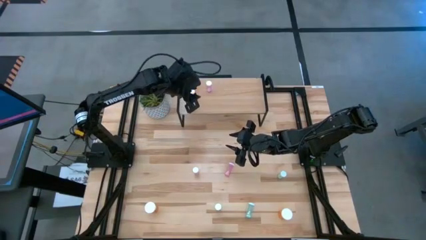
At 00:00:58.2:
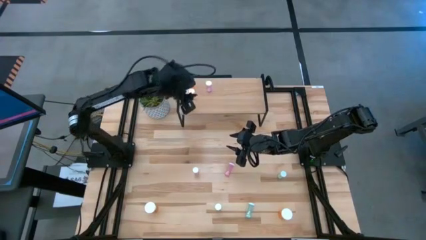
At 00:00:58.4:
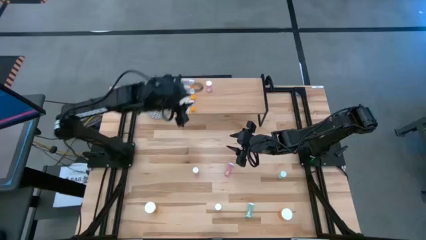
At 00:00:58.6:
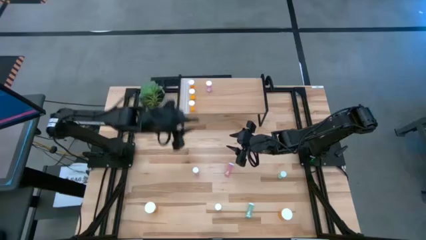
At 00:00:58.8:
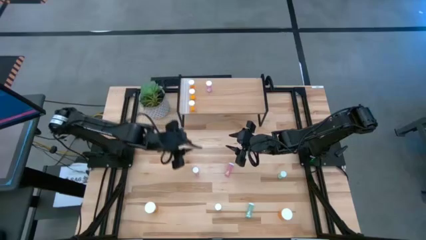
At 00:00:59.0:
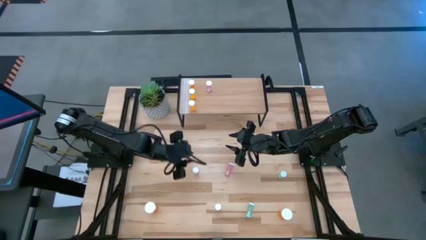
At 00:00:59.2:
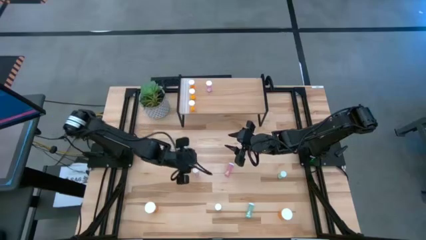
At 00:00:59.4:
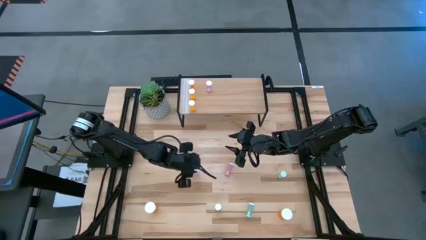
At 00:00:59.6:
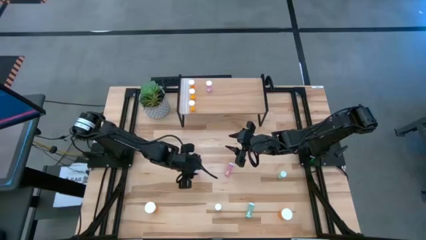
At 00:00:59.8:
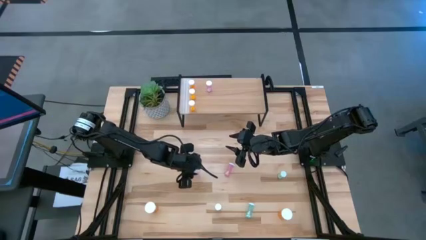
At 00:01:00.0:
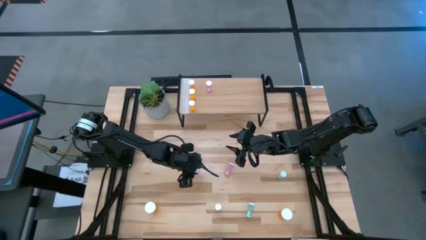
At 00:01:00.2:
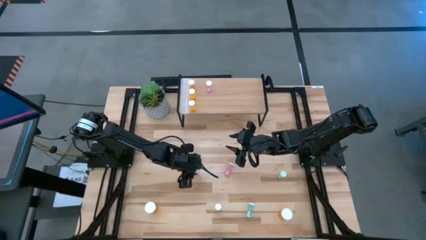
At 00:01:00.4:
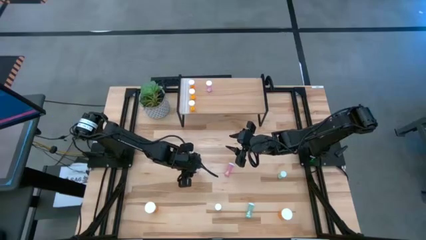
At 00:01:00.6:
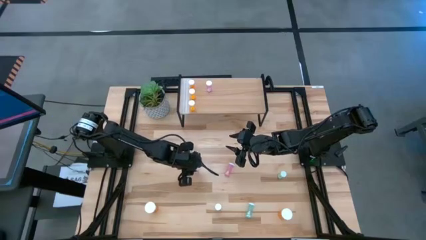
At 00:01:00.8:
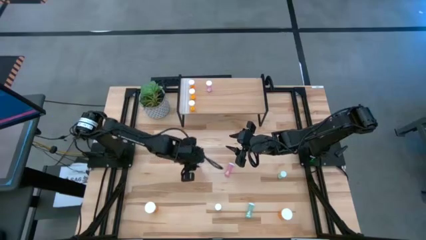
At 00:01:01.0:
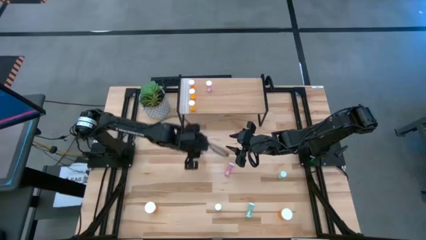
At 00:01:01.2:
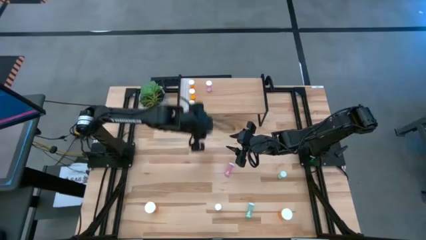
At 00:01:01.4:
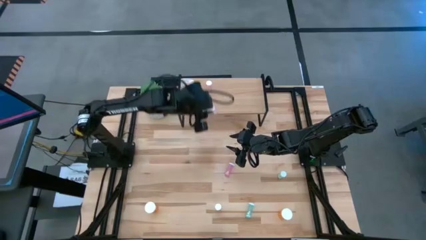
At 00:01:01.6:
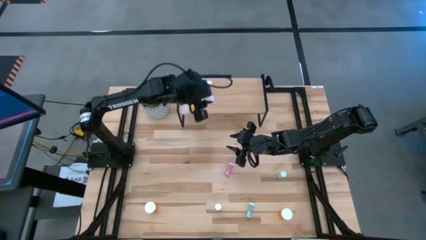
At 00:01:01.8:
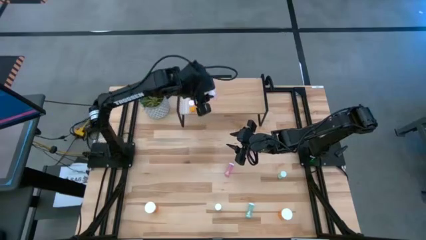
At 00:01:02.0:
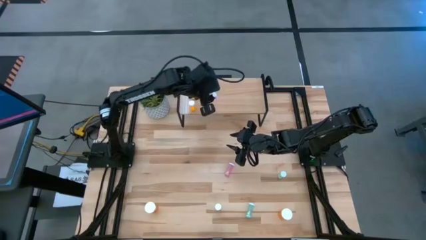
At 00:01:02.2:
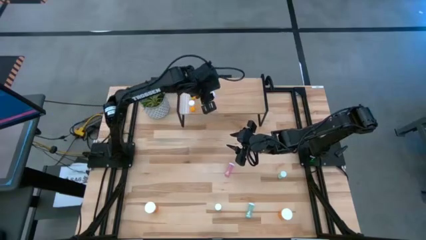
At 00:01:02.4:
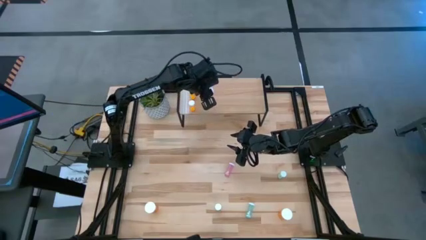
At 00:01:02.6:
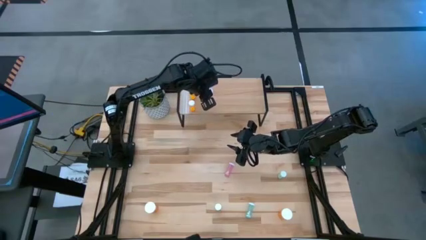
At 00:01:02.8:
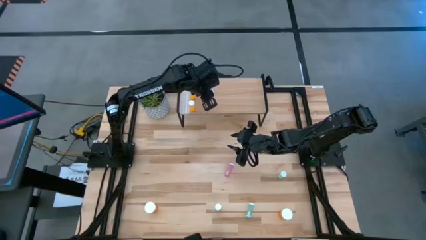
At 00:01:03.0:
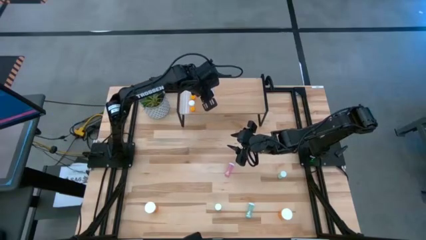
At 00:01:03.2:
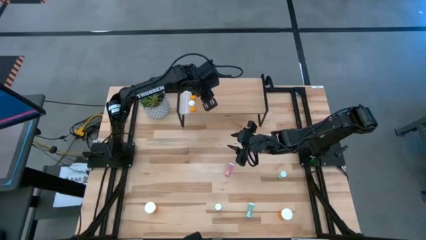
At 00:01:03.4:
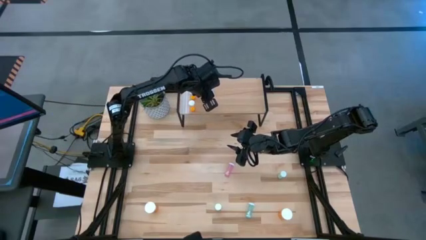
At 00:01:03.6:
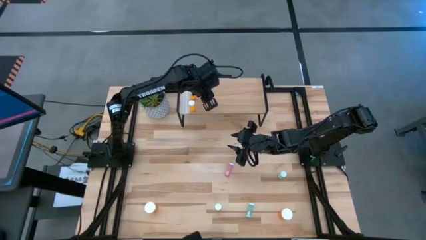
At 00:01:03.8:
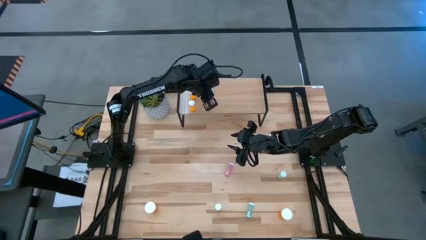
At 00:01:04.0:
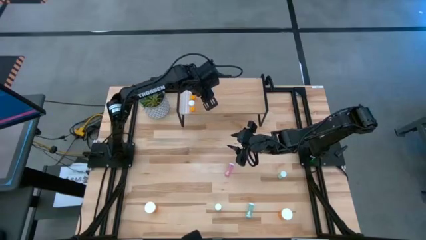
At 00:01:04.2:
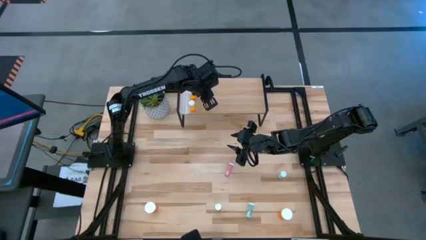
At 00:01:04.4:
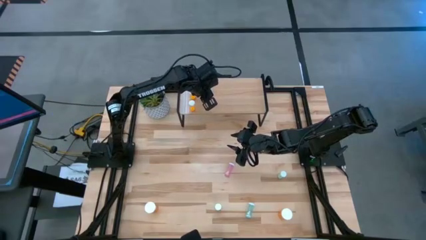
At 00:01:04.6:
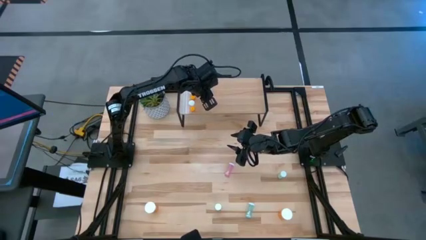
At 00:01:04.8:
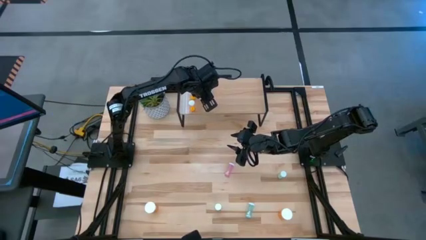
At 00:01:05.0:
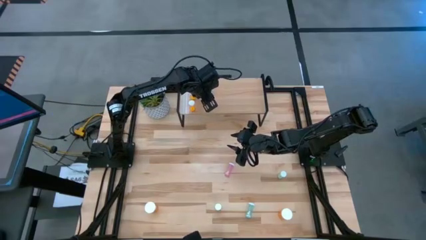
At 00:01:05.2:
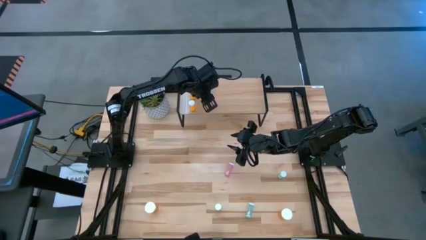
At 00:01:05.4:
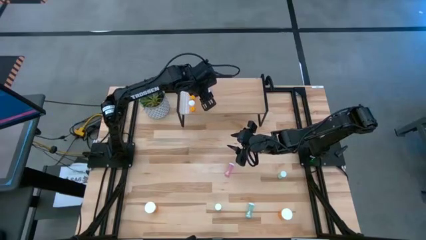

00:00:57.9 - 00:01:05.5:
Task: Pick and place medicine bottles onto shelf by color
Put the bottom pink pill bottle on the shelf aligned with the other pink pill bottle

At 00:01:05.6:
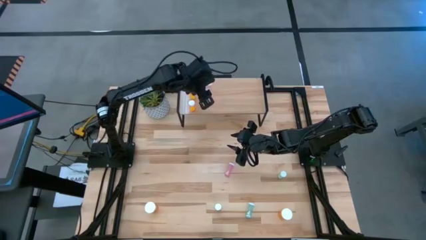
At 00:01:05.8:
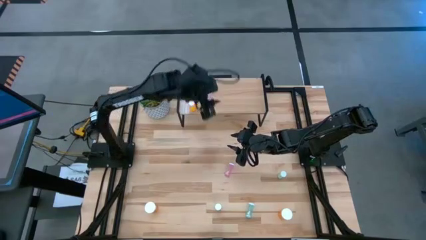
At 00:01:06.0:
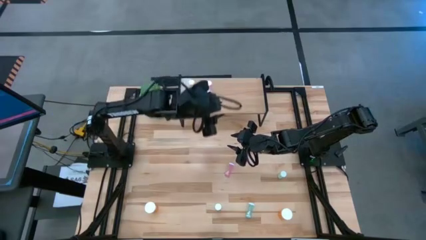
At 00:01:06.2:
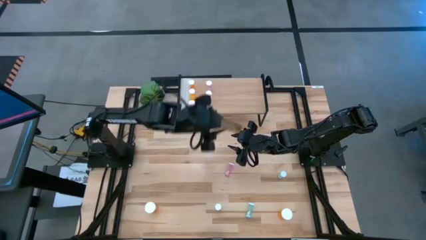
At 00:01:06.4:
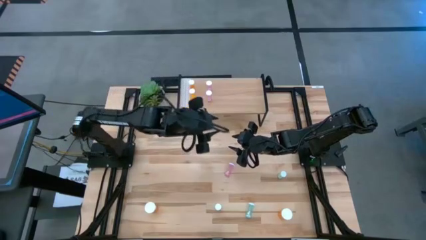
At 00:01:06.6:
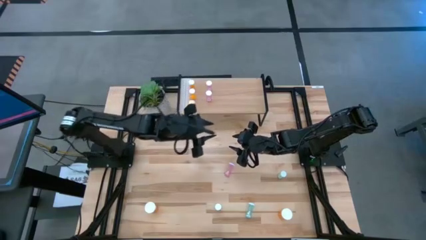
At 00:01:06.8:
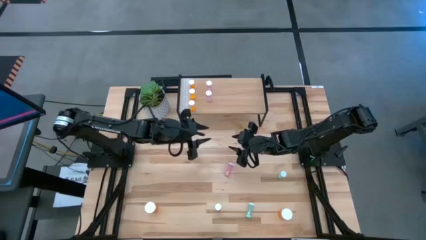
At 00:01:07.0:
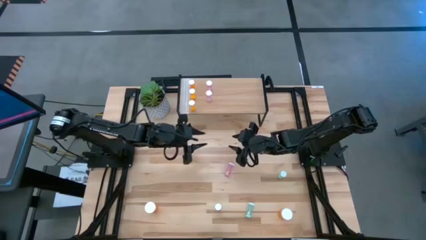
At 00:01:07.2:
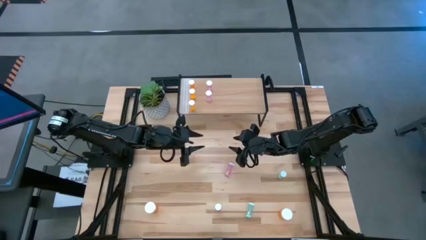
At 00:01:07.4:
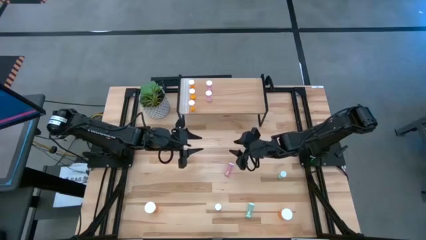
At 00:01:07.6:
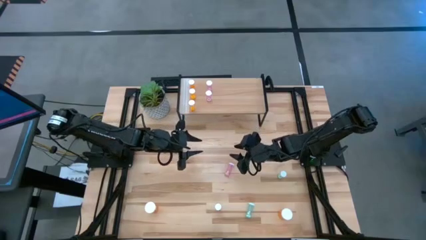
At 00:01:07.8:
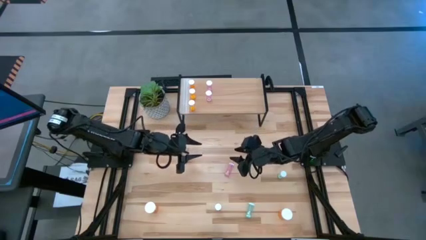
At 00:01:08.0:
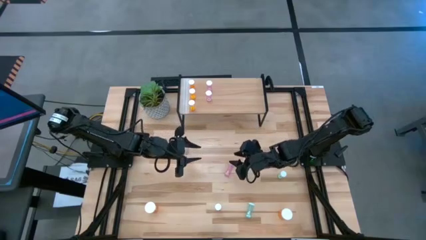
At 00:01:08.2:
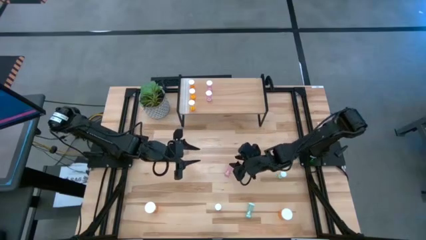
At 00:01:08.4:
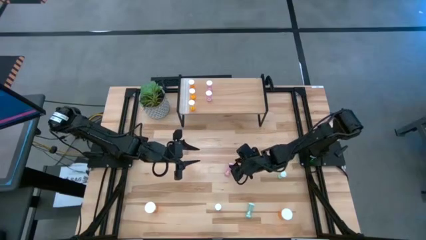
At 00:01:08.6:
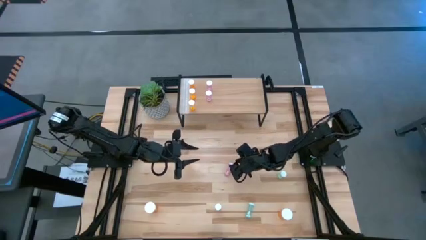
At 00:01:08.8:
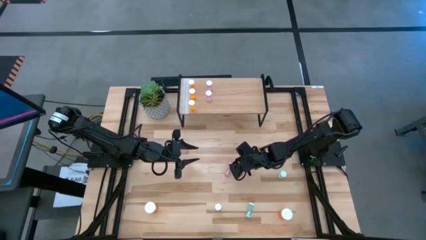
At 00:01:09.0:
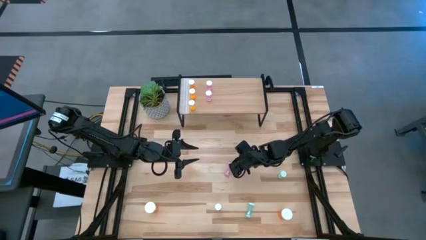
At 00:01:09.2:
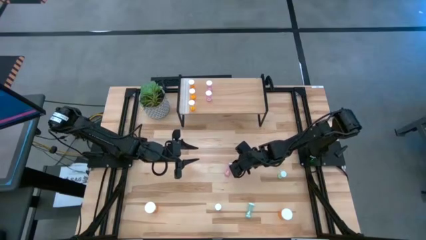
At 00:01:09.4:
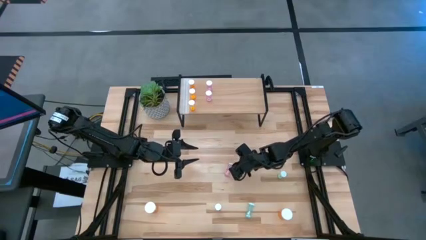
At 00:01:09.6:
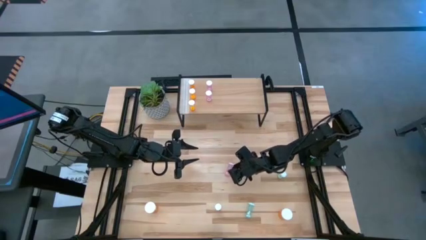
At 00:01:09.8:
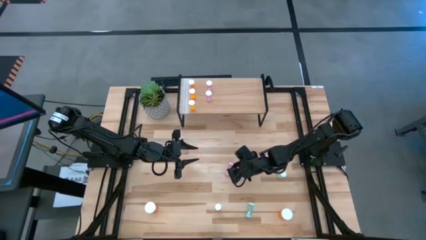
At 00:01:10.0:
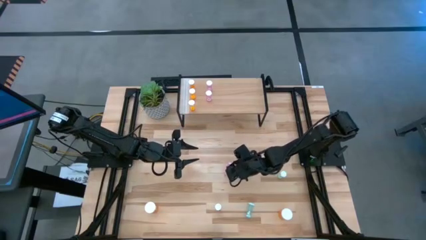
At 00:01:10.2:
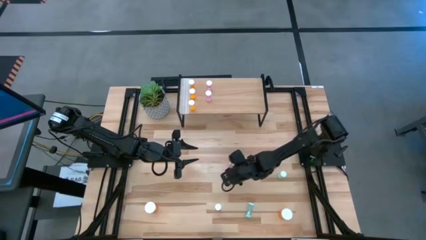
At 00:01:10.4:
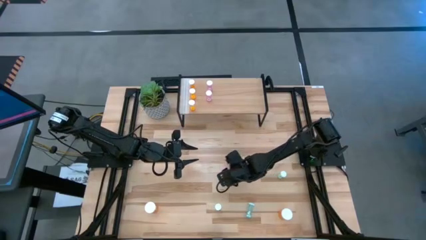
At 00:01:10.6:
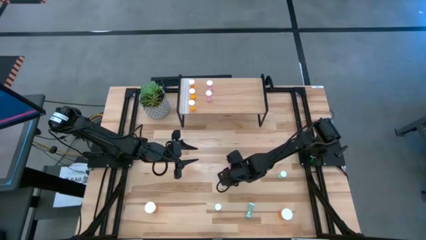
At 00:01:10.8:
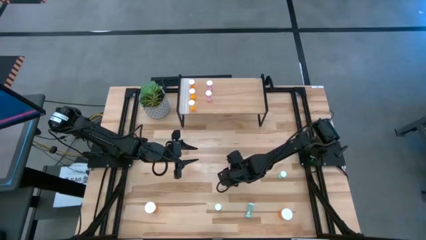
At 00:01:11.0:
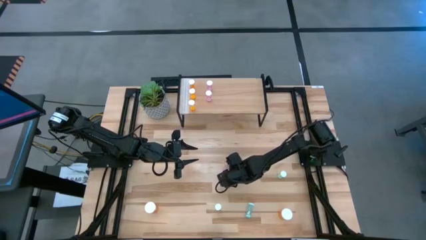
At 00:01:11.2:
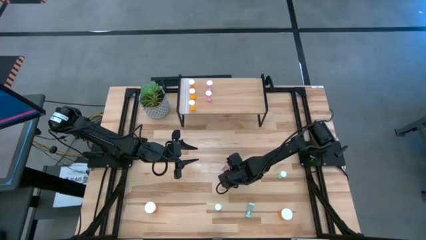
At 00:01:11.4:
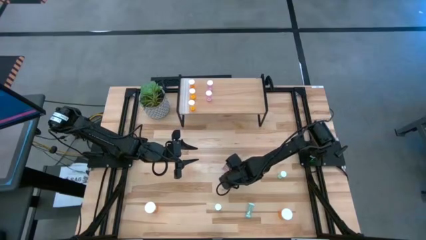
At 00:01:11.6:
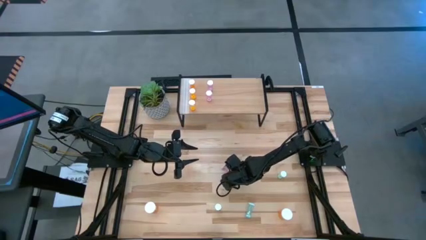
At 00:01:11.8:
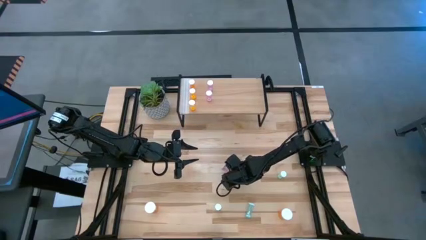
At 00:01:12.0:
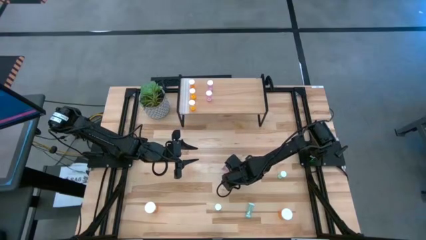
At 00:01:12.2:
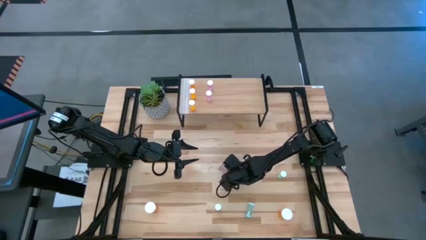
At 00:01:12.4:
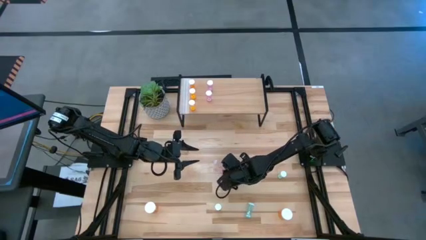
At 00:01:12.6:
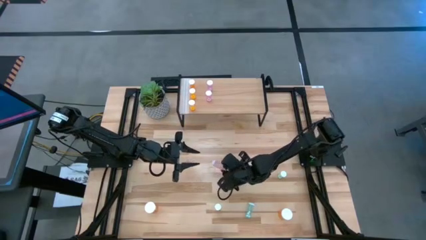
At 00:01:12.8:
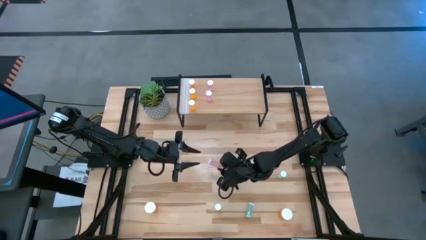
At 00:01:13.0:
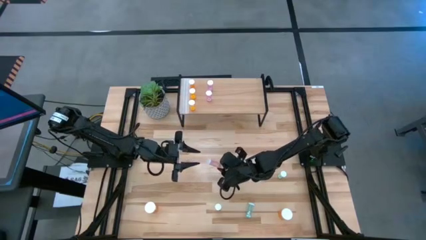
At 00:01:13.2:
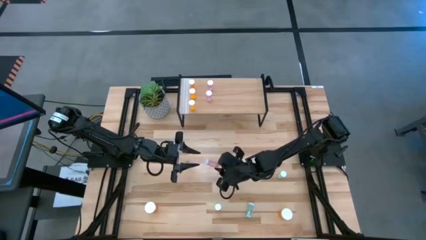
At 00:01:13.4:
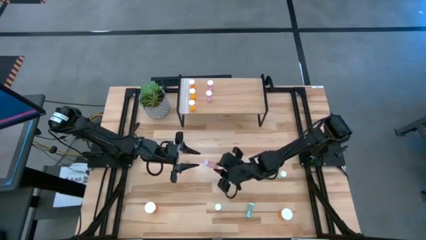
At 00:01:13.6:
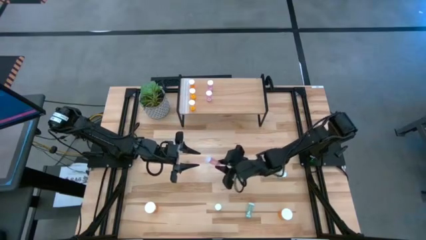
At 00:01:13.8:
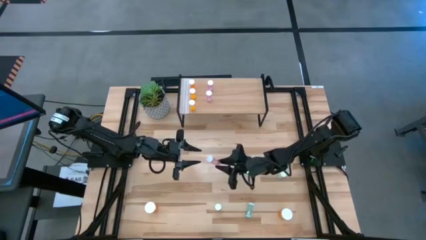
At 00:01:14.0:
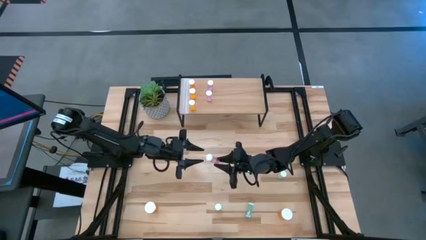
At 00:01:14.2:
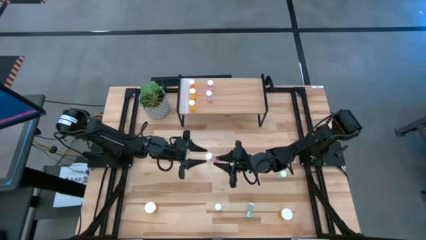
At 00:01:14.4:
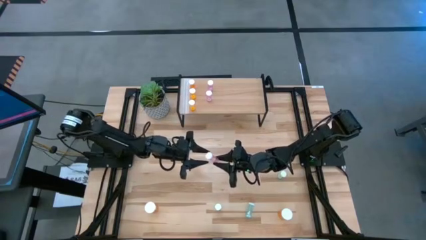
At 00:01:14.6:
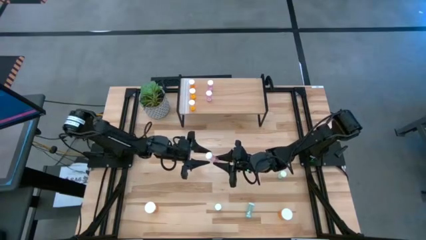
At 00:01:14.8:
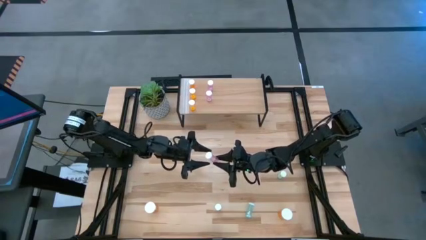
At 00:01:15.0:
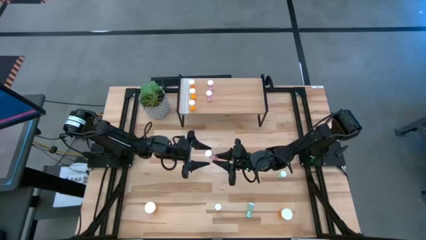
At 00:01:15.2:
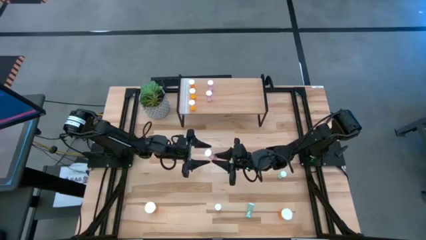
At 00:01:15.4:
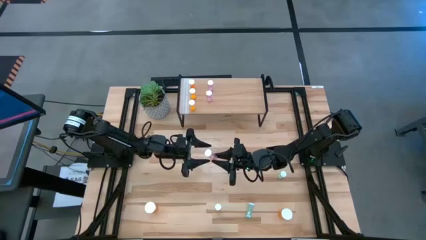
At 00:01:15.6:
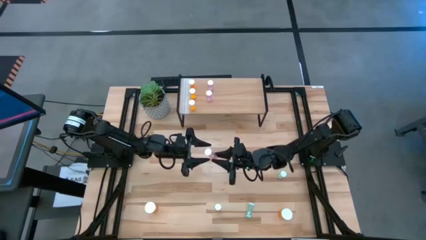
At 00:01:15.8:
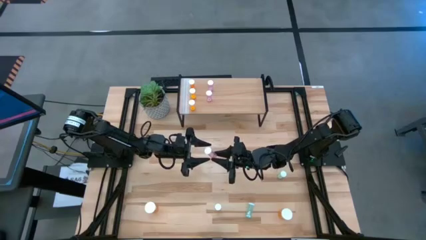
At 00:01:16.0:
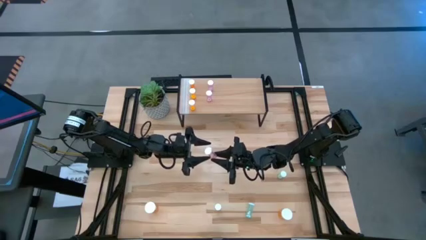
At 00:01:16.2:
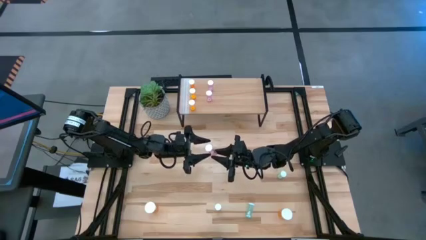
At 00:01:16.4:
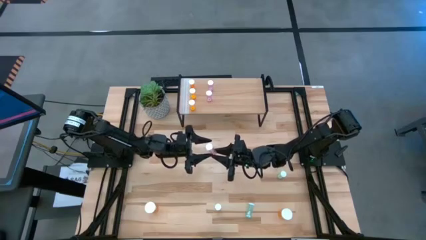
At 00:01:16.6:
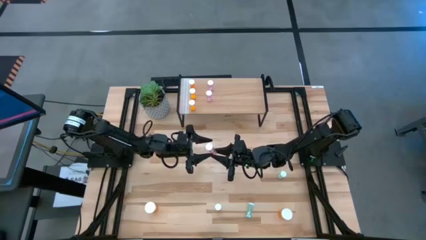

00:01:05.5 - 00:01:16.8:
Put the pink pill bottle on the shelf aligned with the other pink pill bottles
